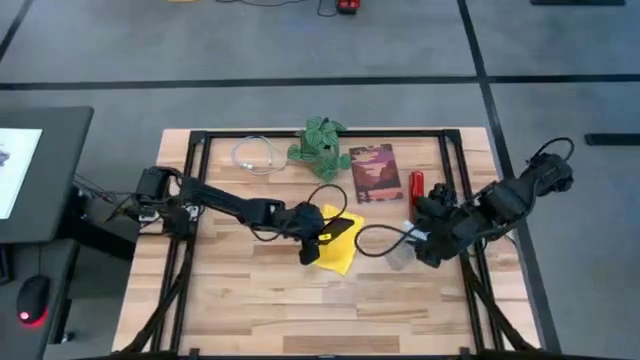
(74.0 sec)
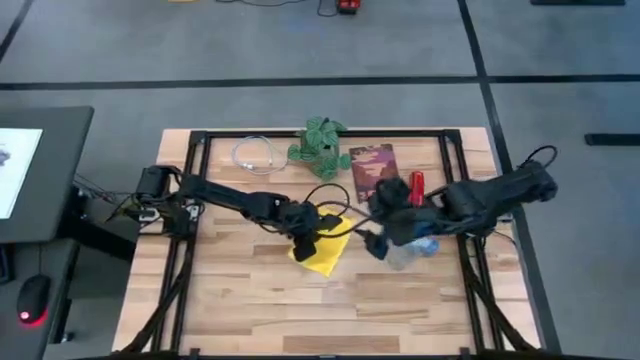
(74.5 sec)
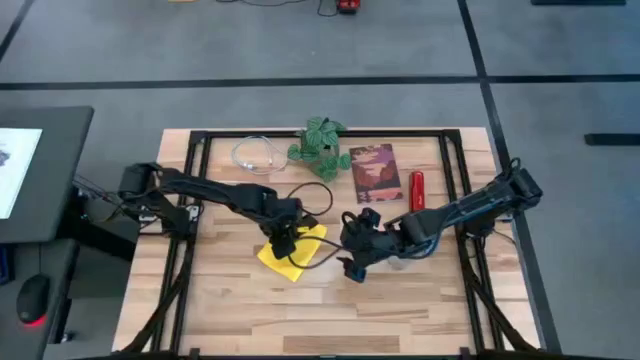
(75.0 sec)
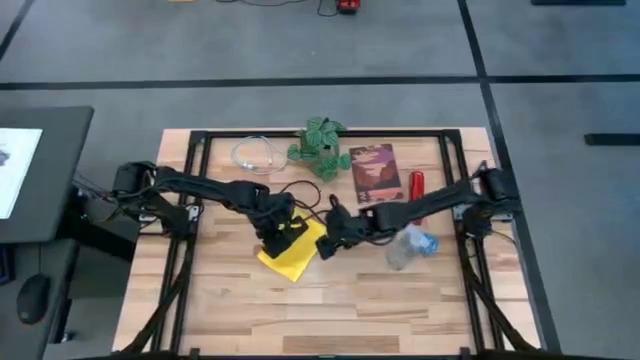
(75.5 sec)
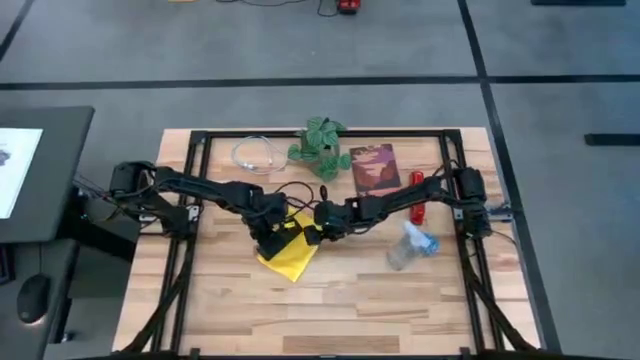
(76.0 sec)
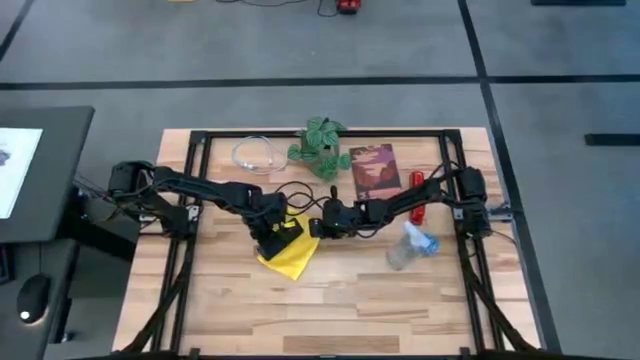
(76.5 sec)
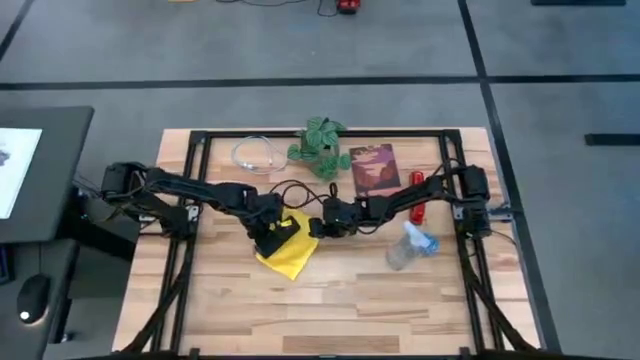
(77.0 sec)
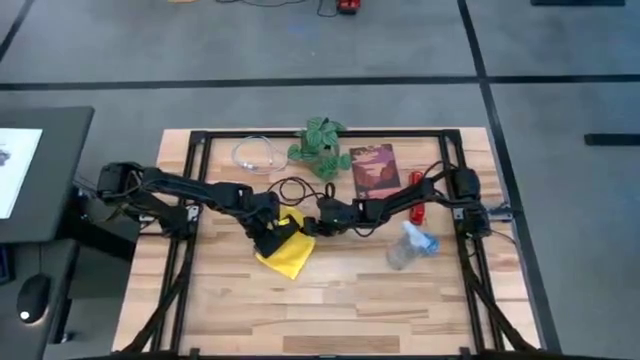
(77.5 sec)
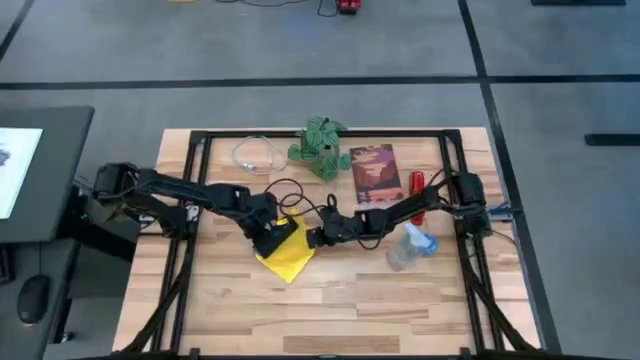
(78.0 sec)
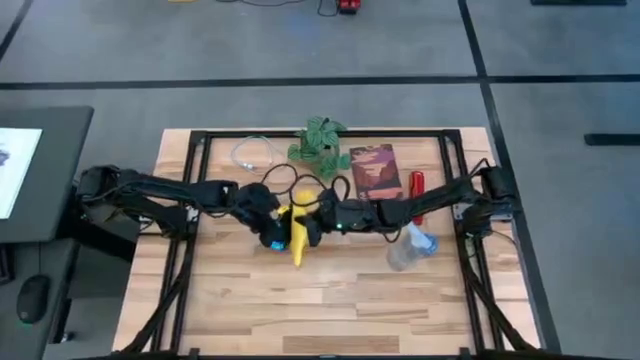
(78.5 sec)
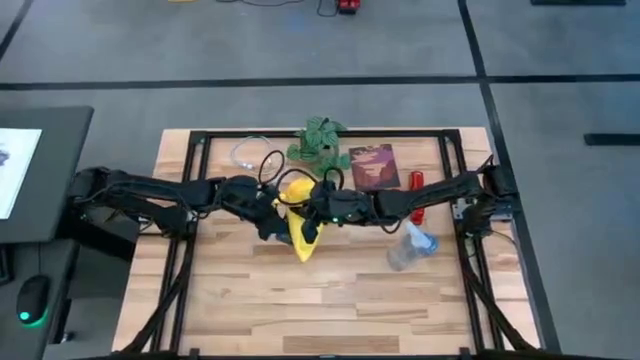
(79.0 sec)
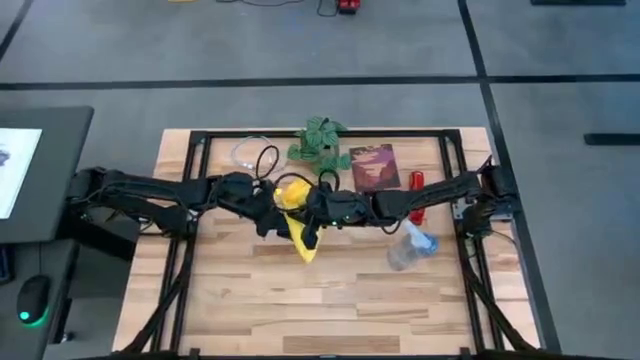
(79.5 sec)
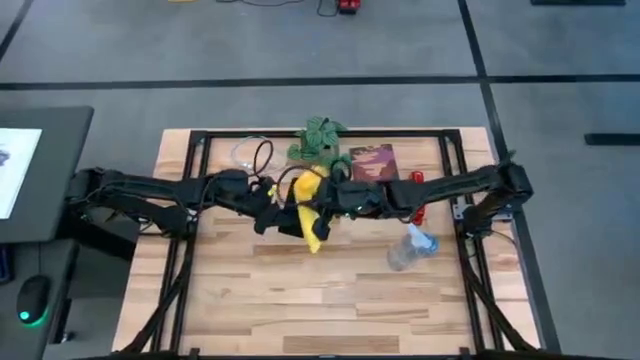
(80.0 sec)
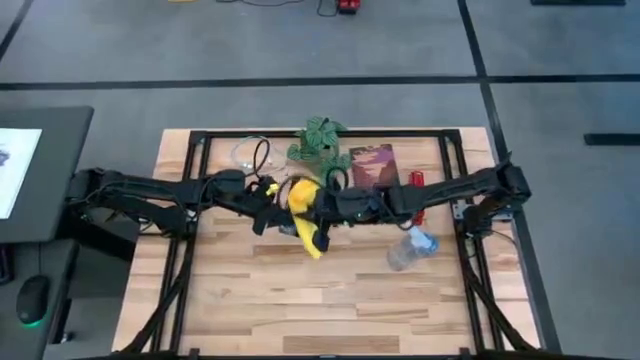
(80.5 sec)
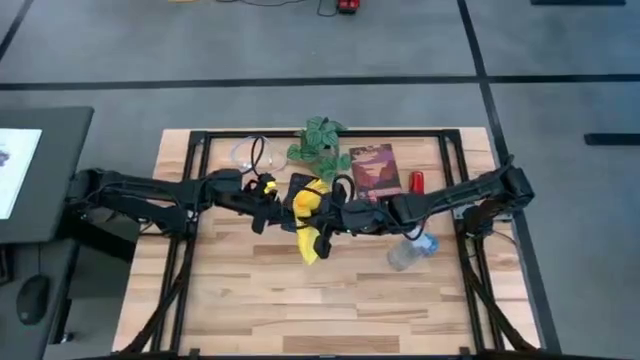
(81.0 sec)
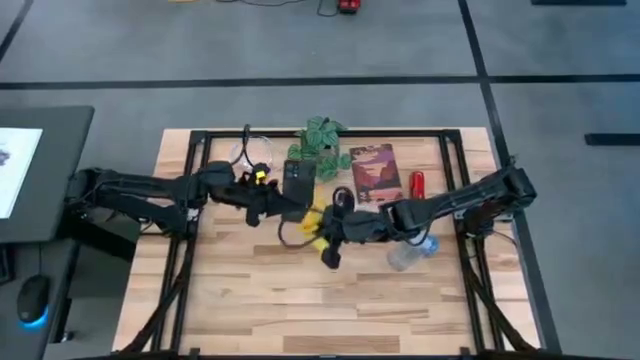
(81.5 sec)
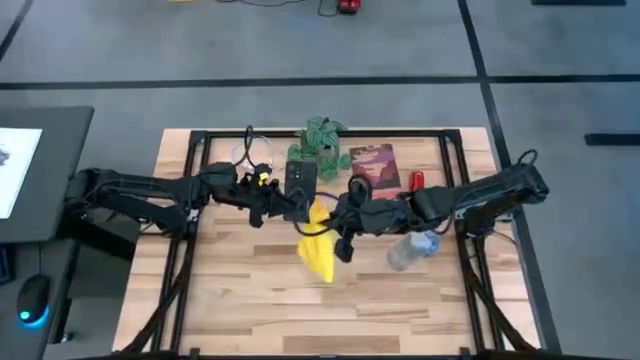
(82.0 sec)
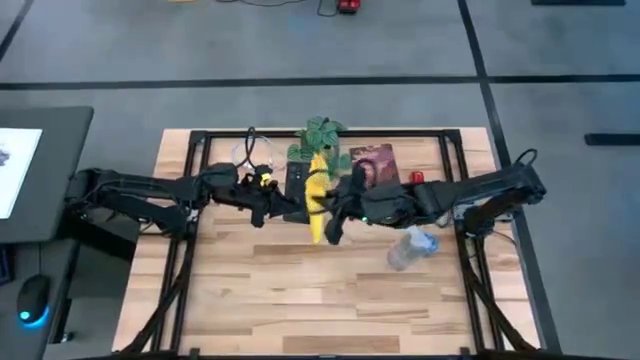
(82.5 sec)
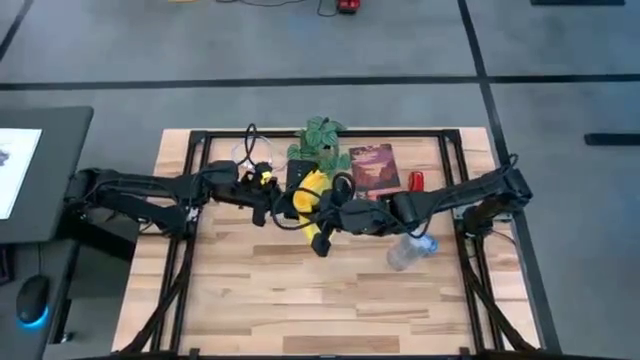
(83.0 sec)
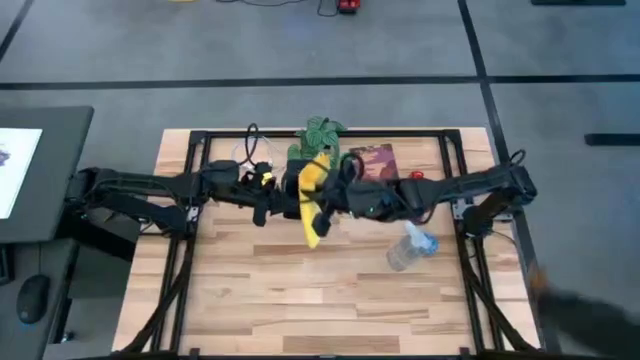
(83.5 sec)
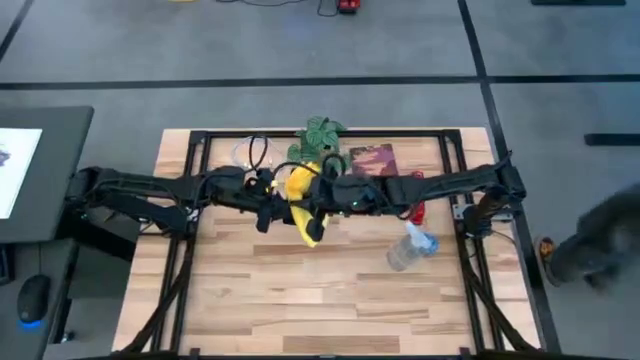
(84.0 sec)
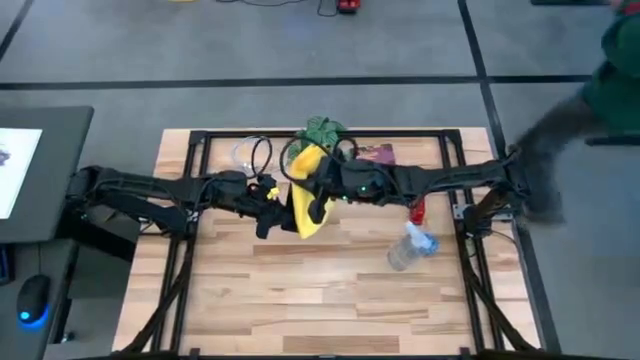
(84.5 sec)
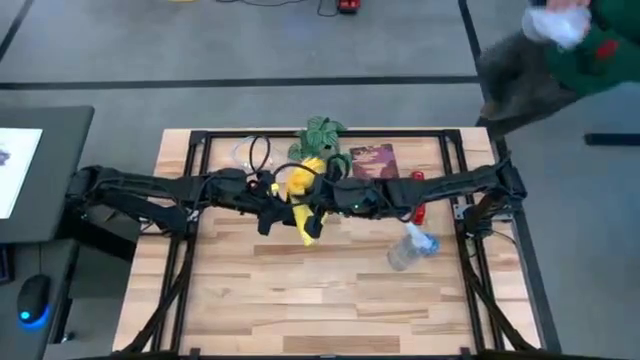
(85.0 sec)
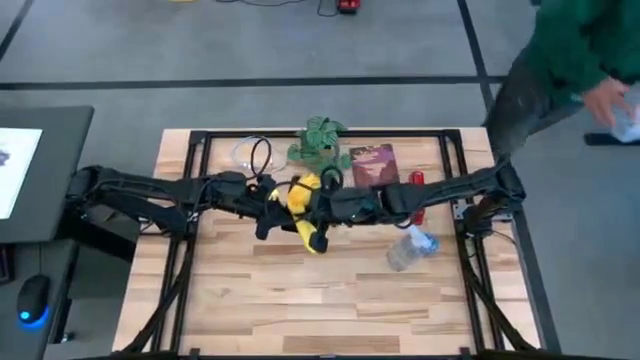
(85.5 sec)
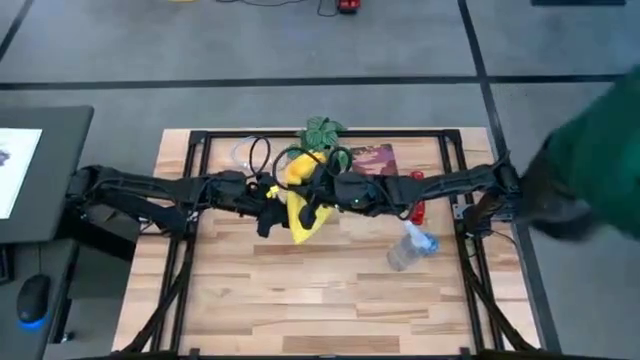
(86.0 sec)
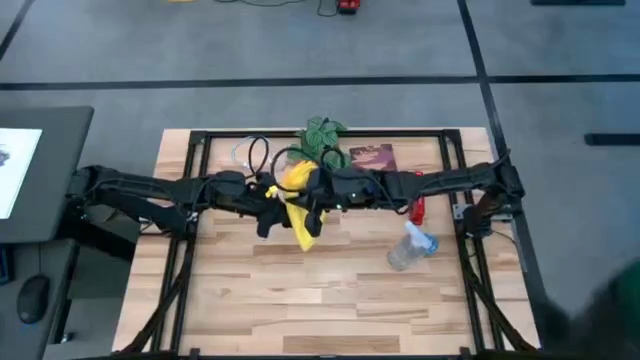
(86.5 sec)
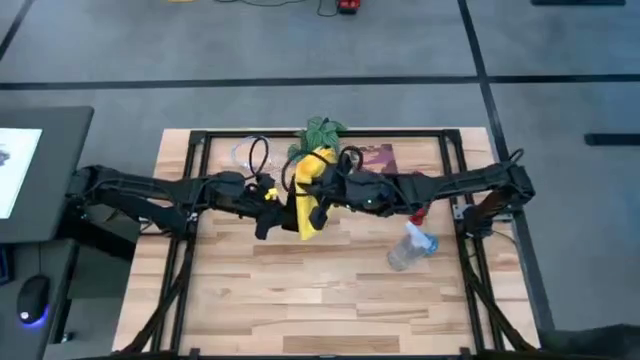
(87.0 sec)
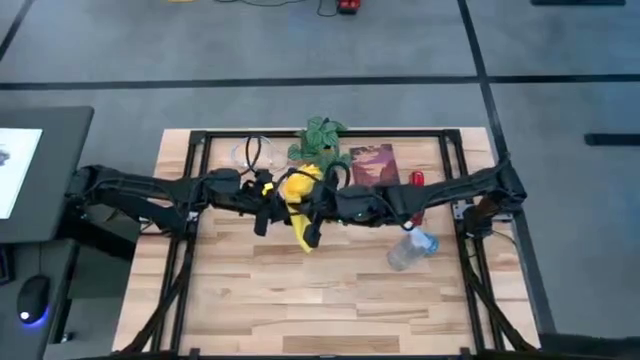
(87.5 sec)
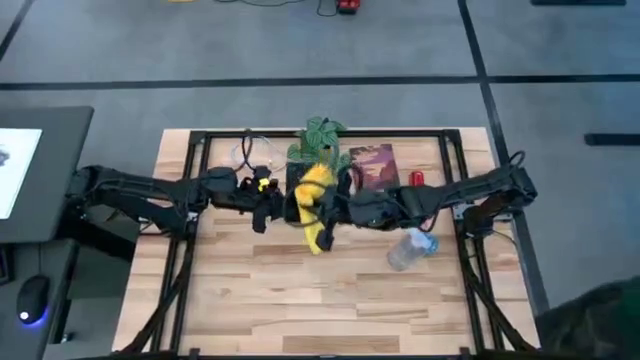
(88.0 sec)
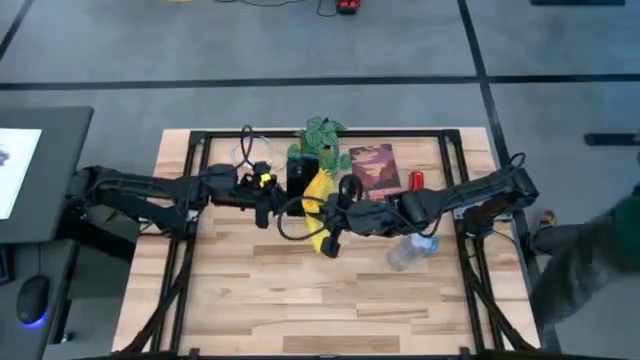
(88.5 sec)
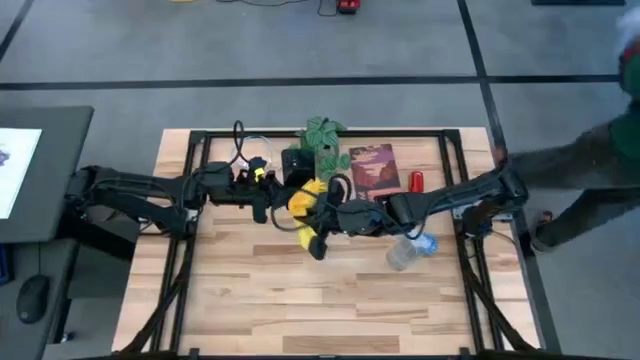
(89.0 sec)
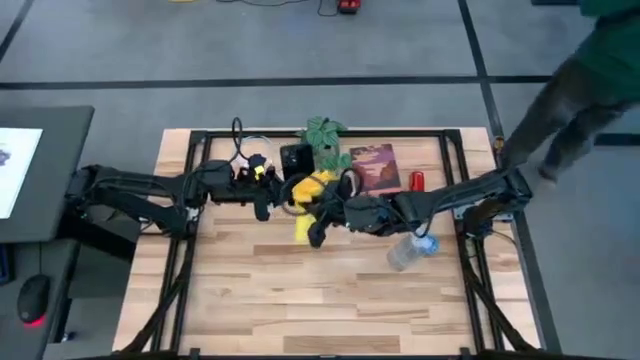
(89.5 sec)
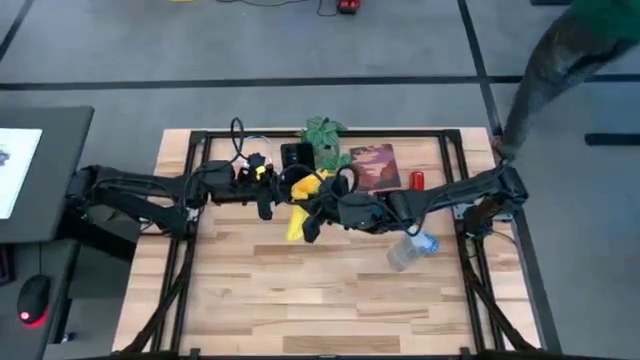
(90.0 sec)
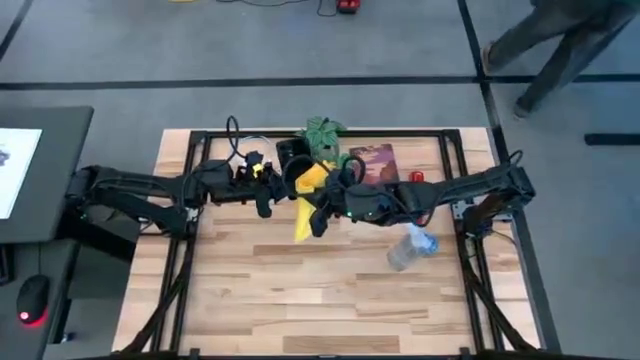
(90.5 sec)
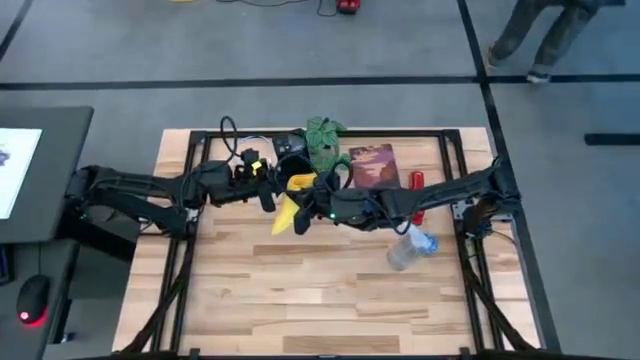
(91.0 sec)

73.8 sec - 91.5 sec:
Task: Apply microfiber cloth
Wipe the back and front of the cellphone with the yellow microfiber cloth

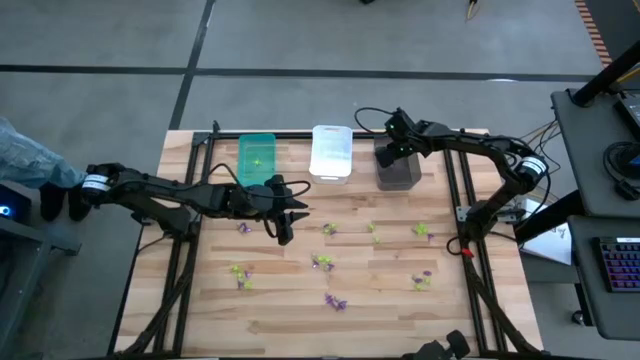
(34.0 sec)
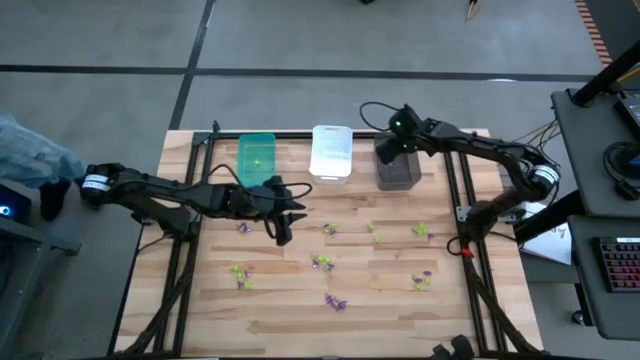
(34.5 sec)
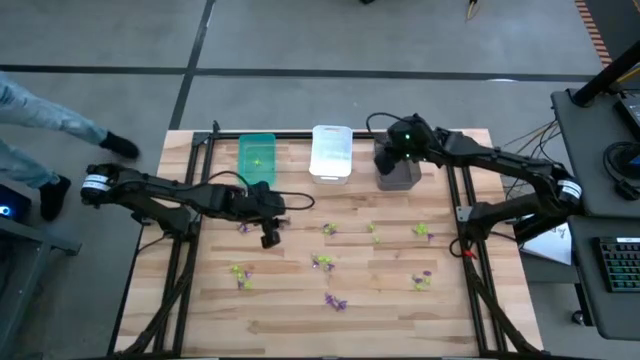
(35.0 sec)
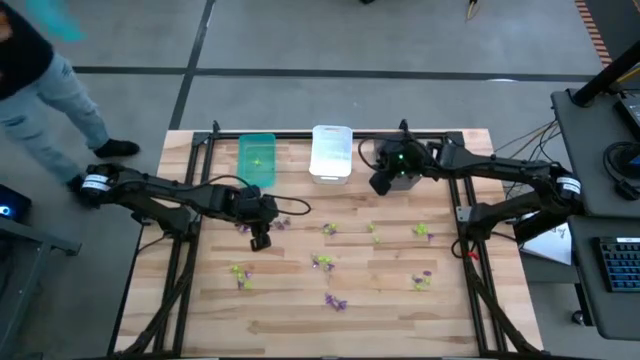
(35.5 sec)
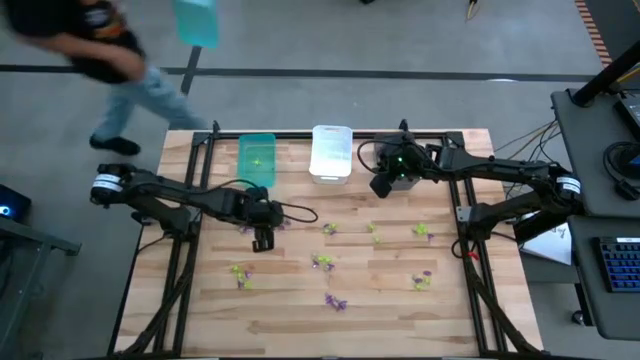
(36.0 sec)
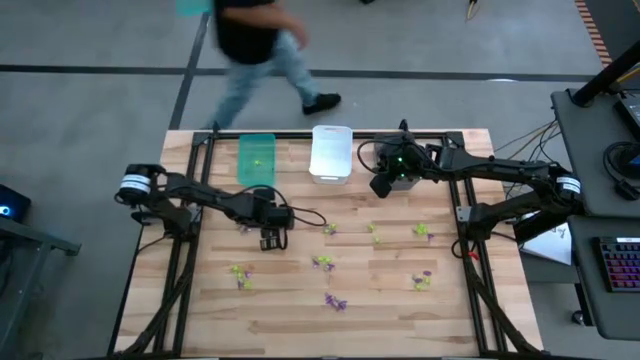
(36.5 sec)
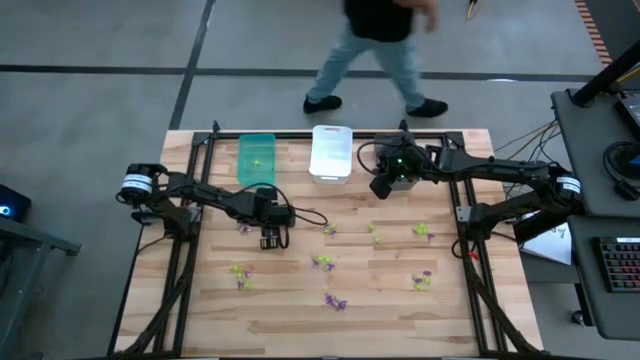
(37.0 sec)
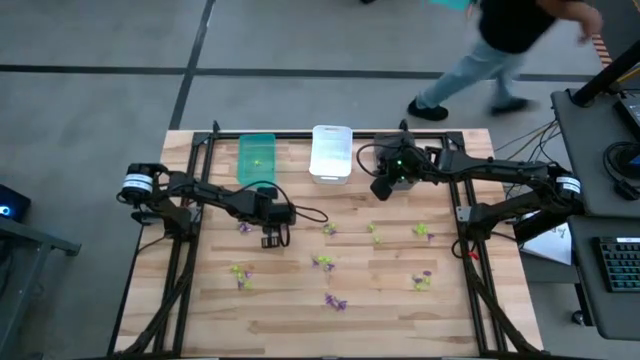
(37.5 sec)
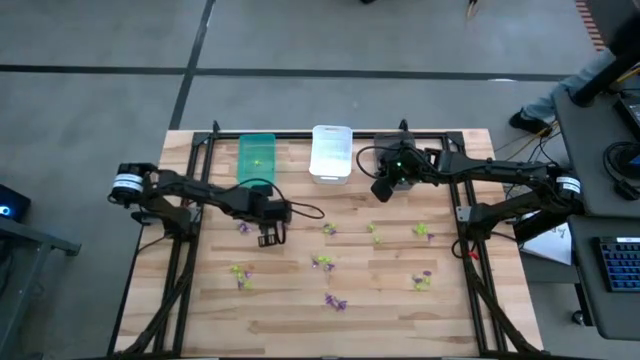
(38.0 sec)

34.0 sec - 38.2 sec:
Task: Sort Halloween decoration
Put the white skull toy into the white bin
